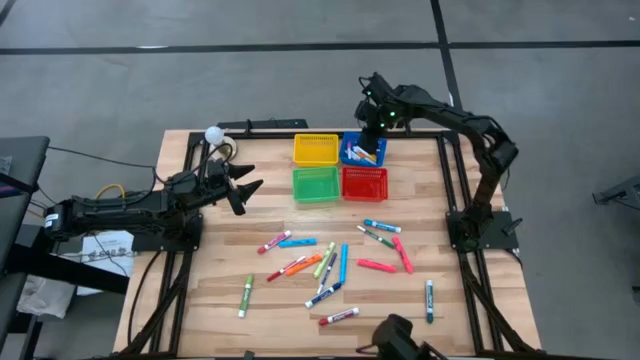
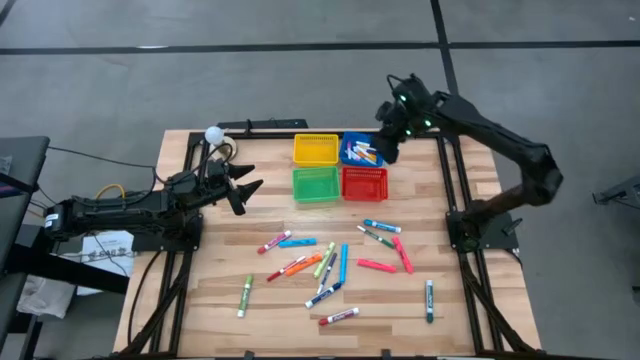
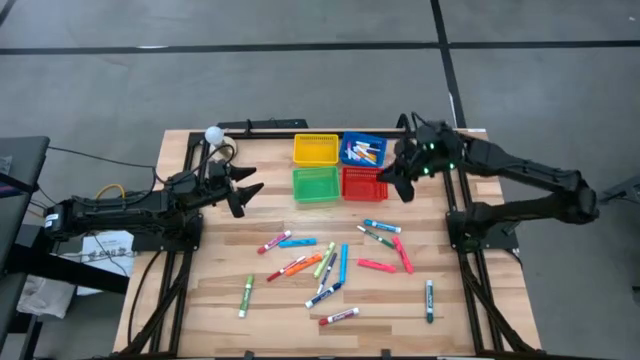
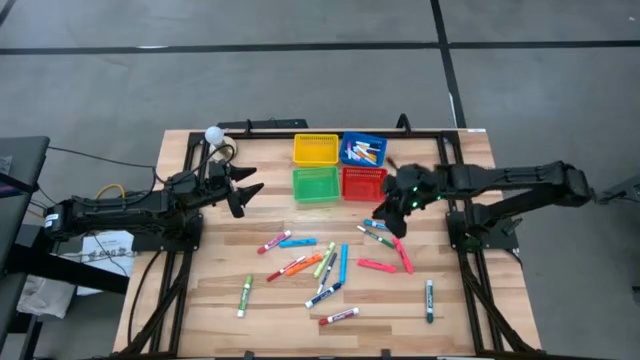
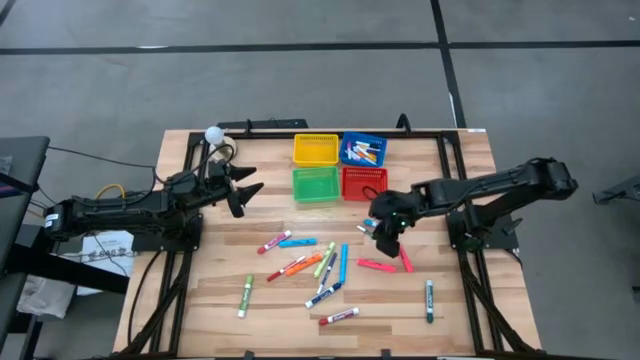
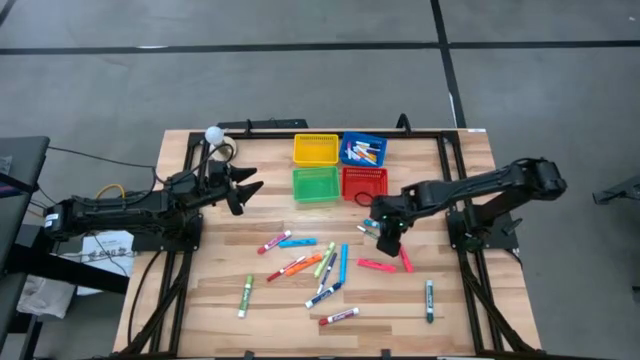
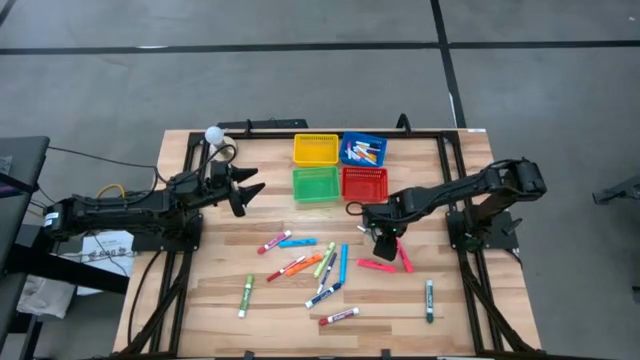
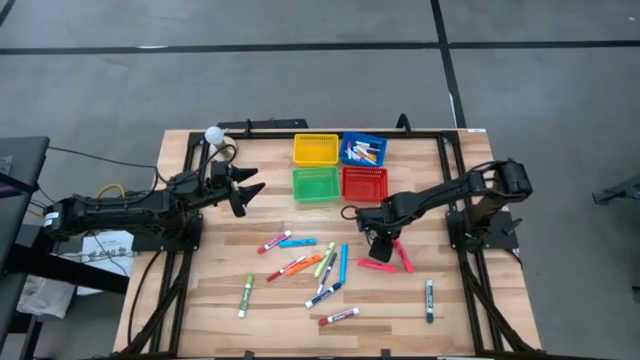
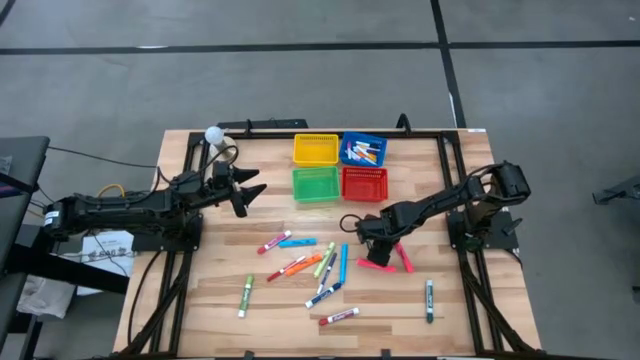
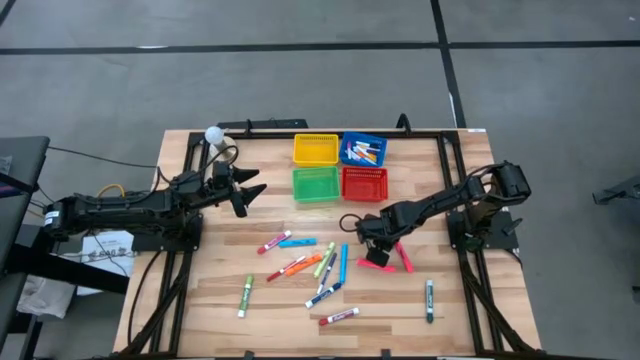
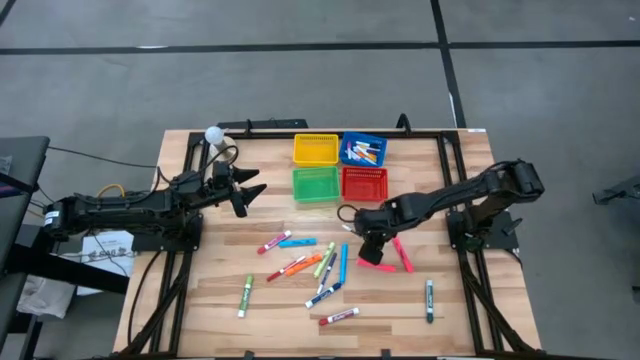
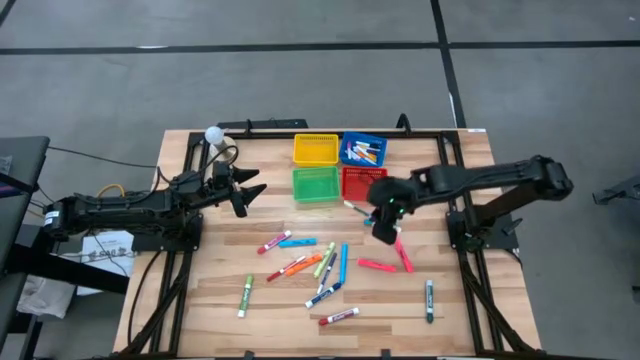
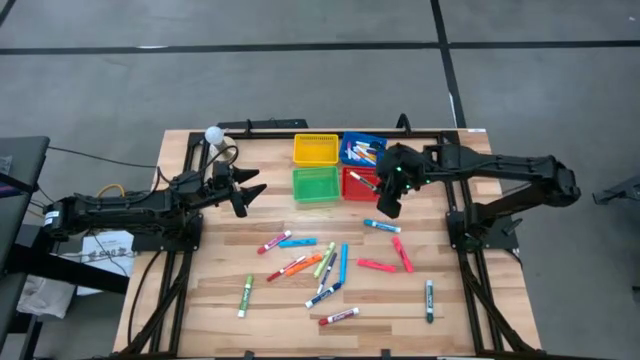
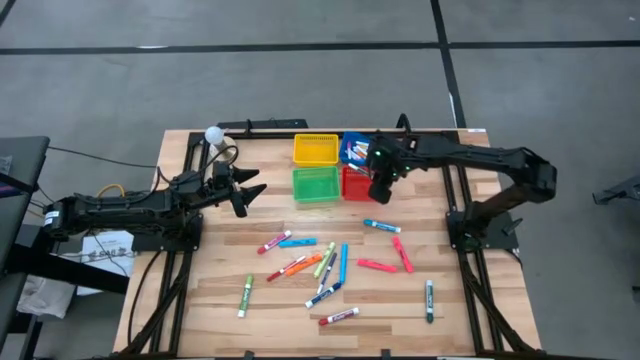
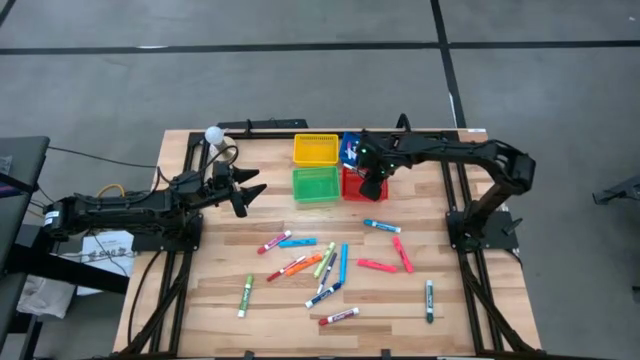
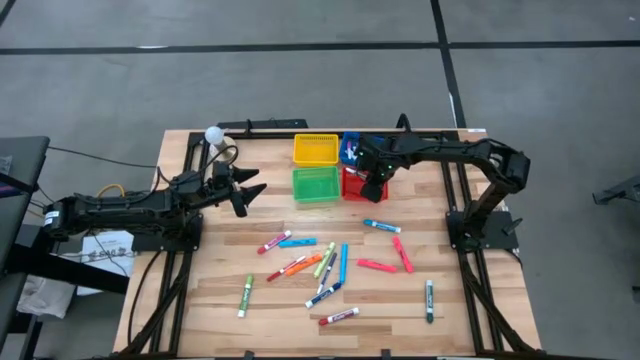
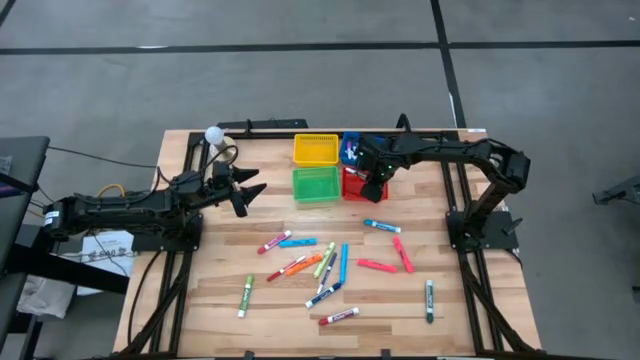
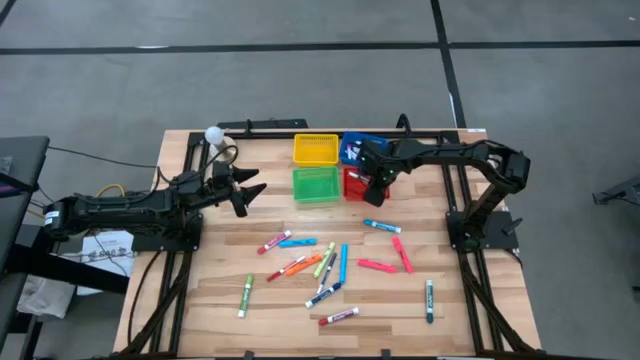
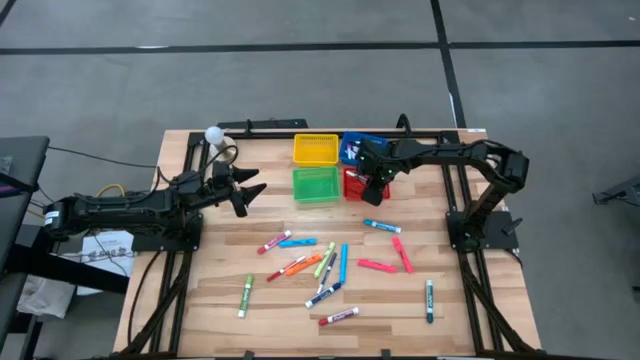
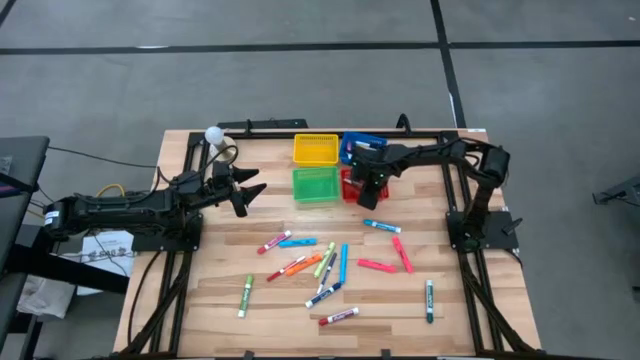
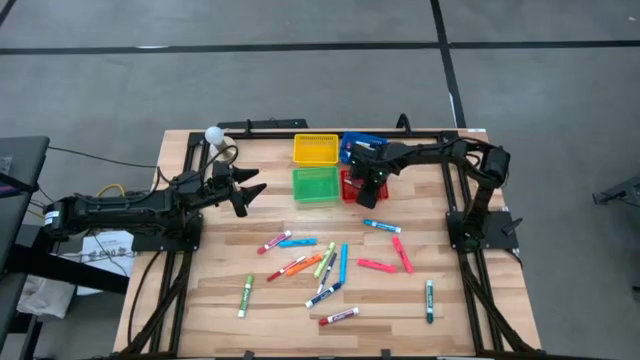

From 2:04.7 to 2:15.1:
Task: Pick & Place Markers
Put the green thin dry erase marker into the red bin

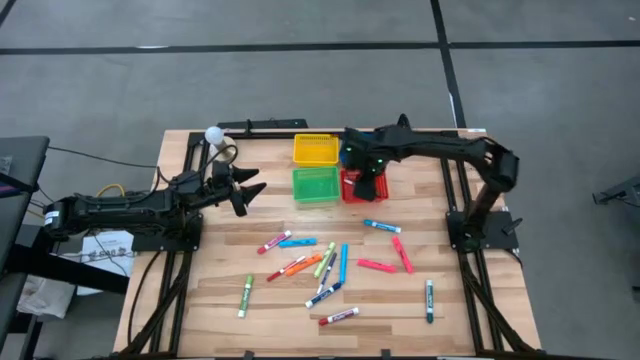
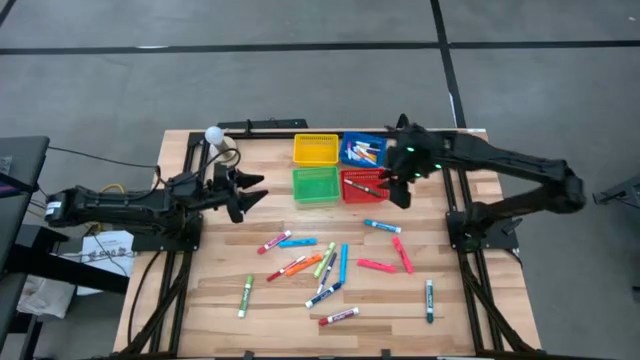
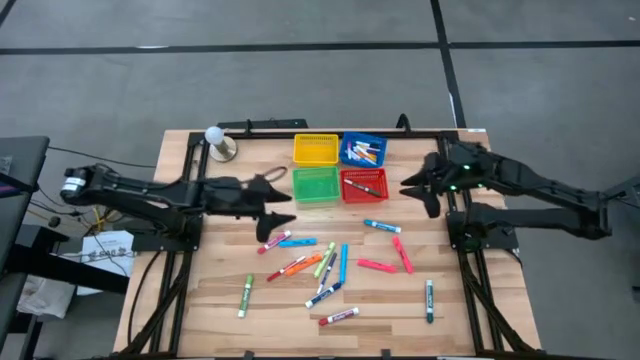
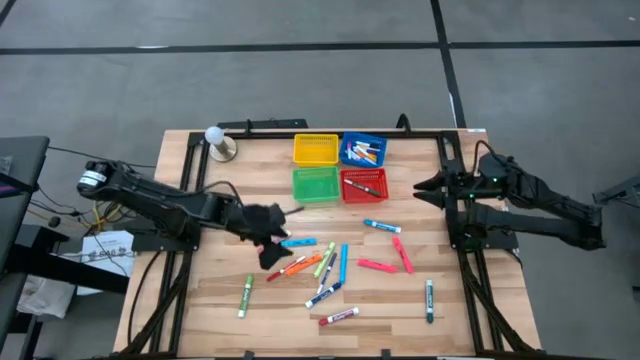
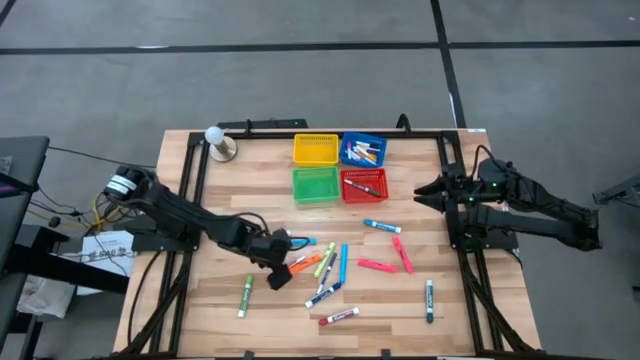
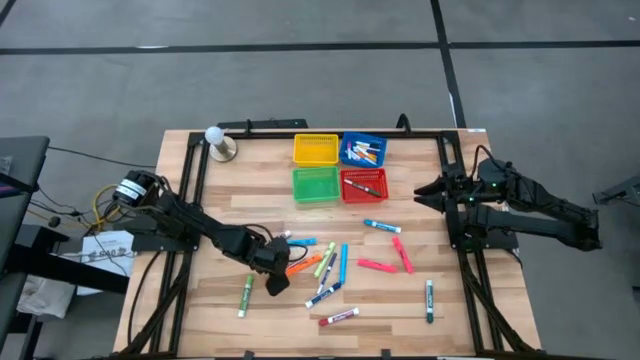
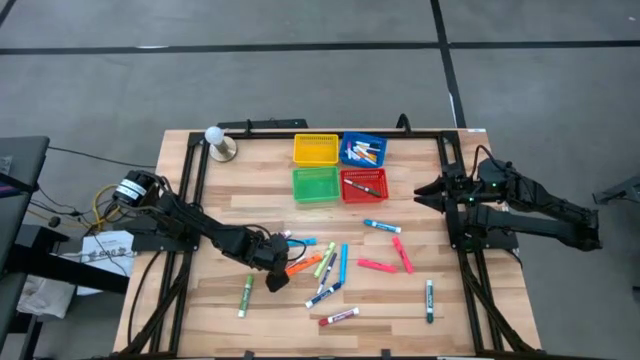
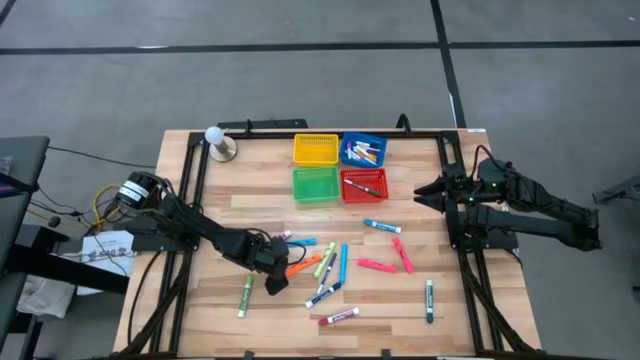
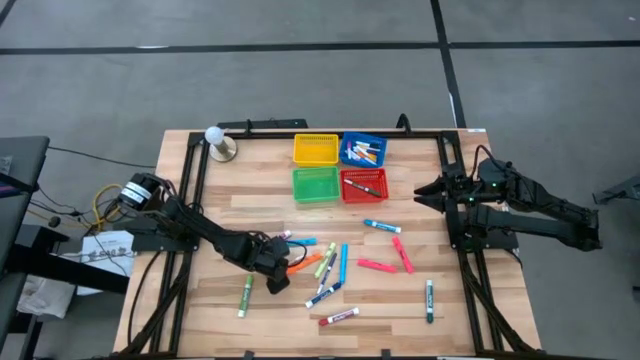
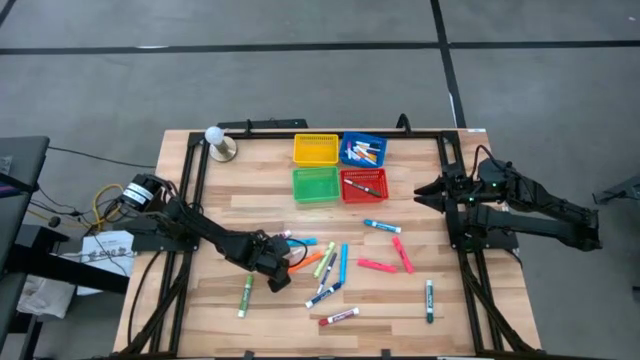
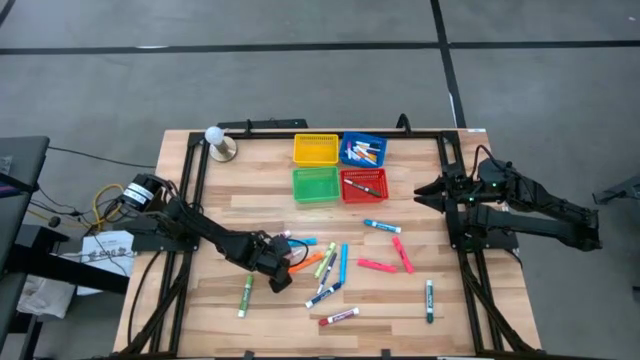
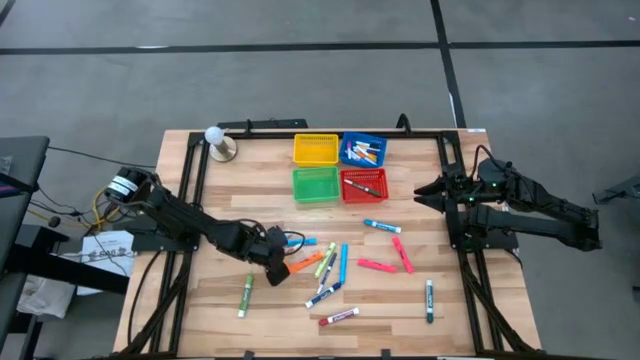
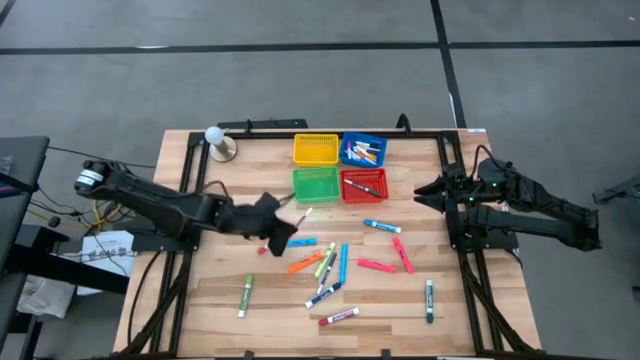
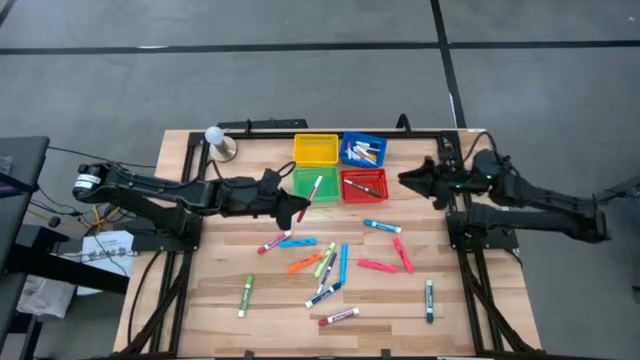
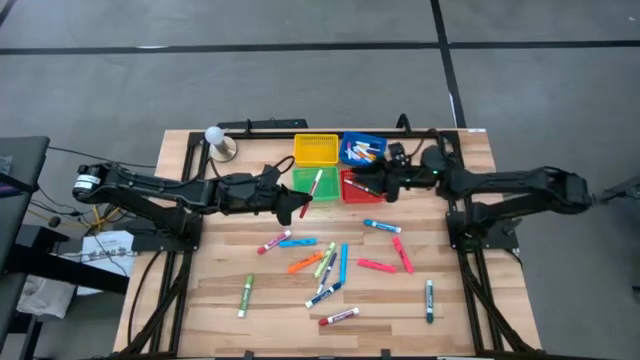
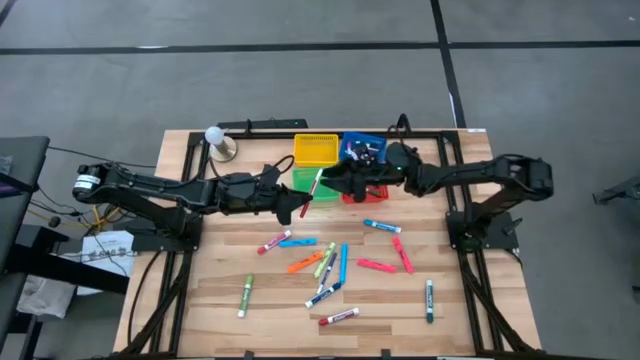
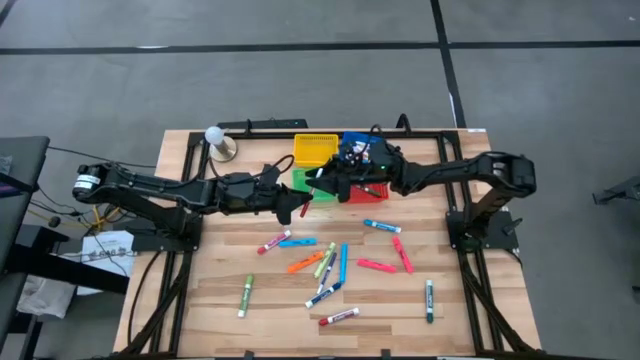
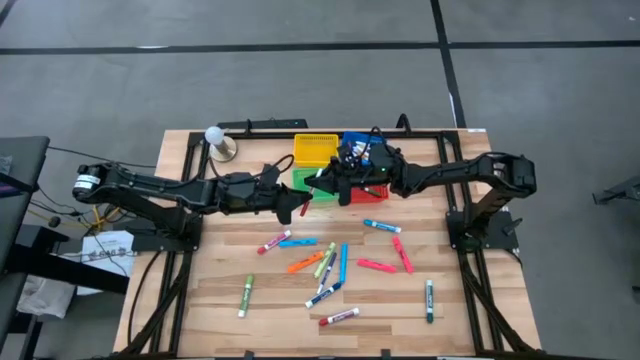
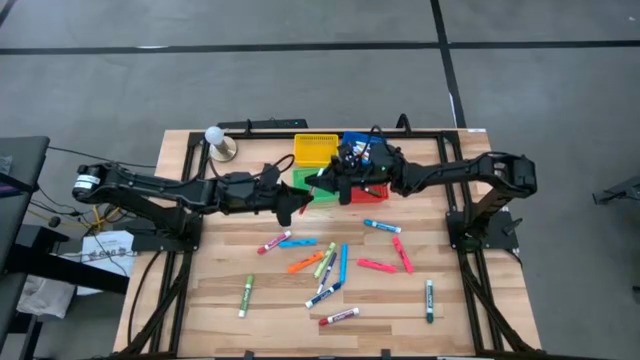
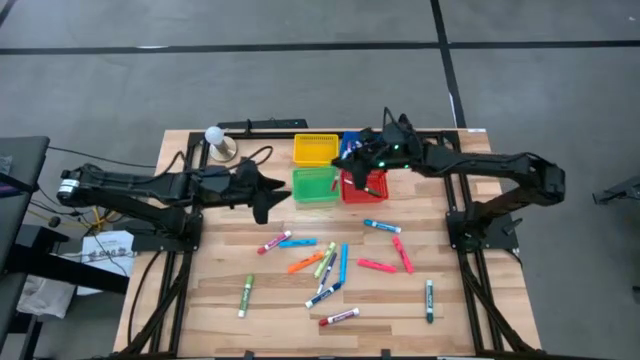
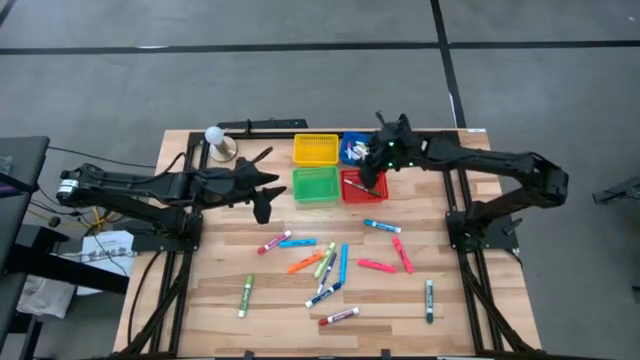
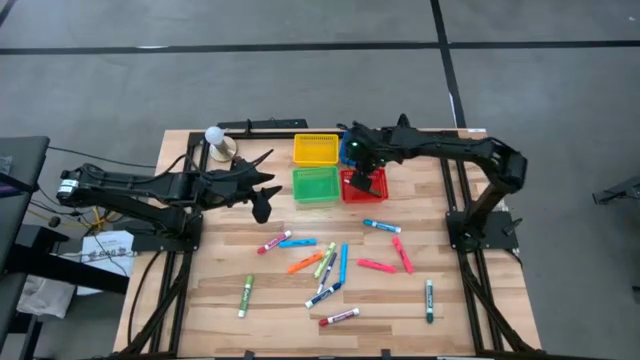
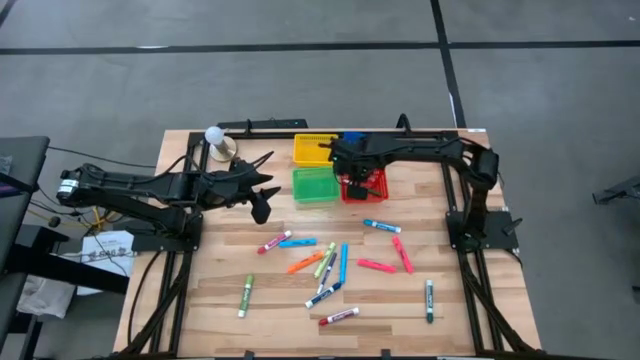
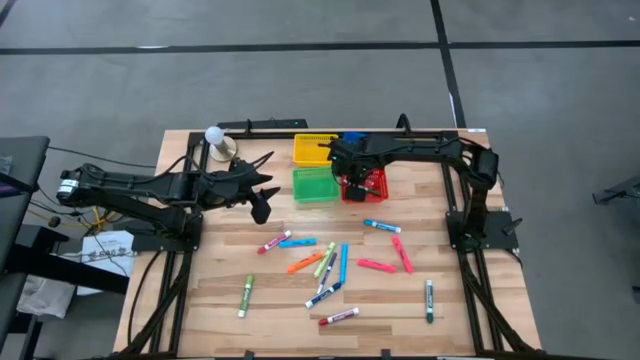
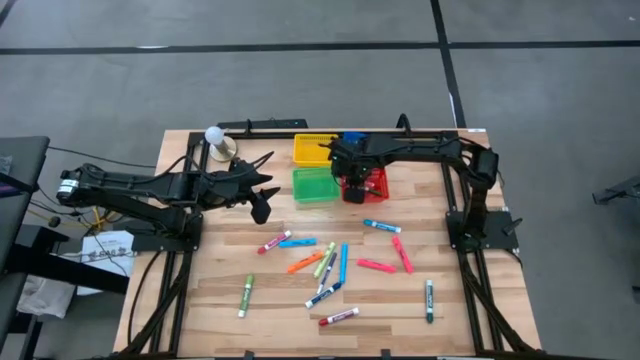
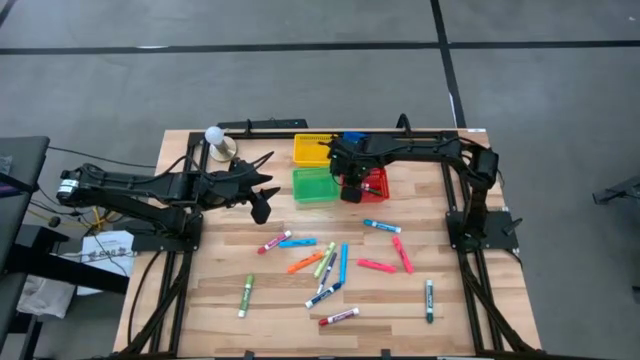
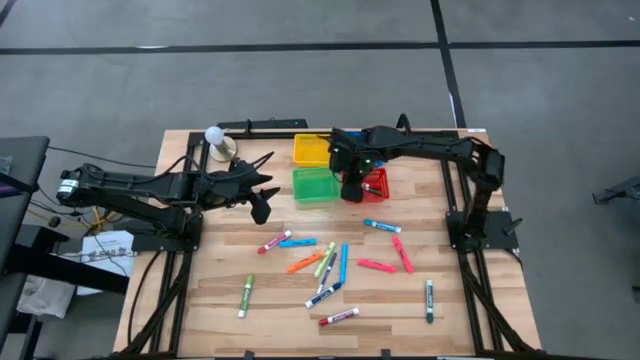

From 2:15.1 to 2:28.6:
Put the red thin dry erase marker into the red bin
